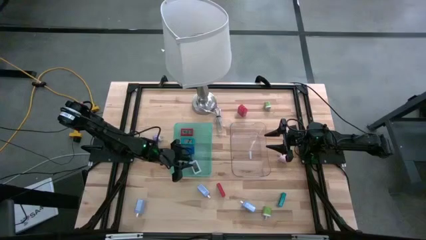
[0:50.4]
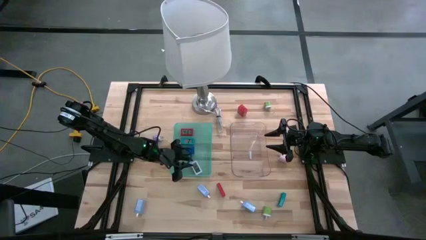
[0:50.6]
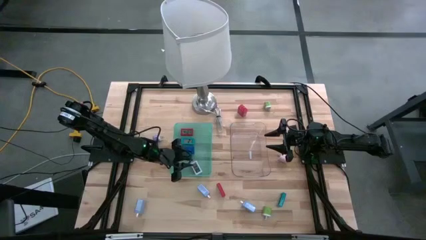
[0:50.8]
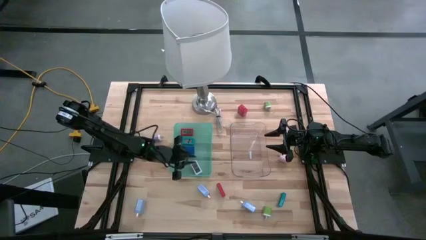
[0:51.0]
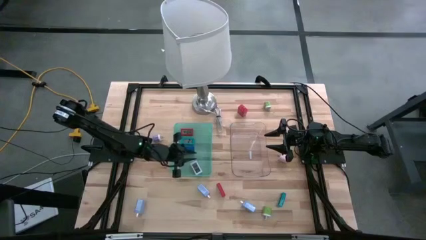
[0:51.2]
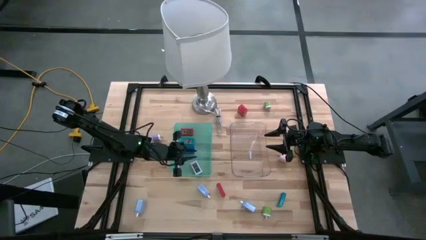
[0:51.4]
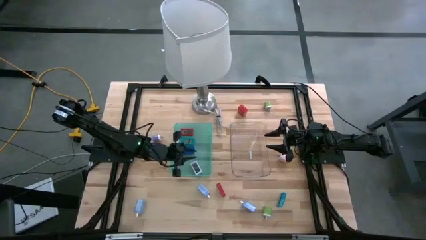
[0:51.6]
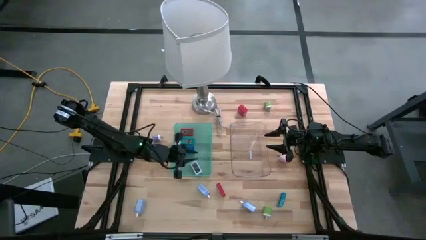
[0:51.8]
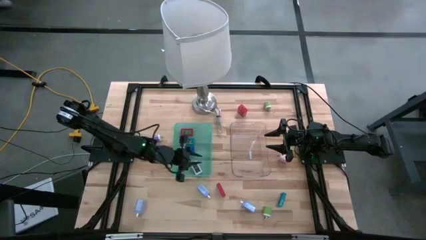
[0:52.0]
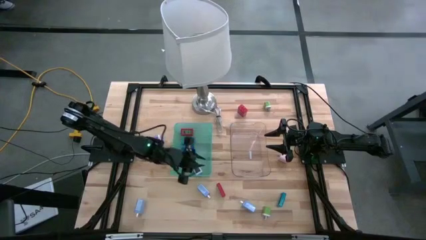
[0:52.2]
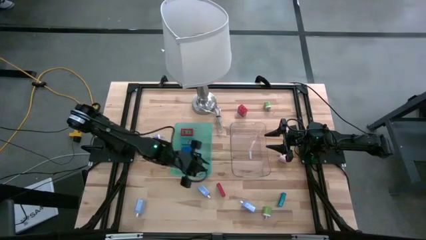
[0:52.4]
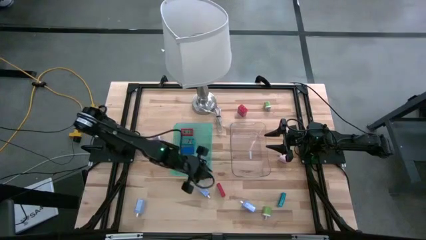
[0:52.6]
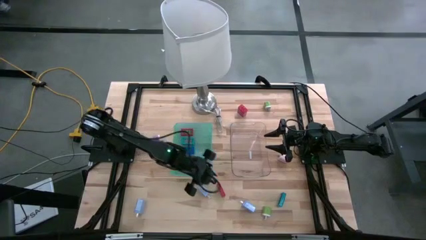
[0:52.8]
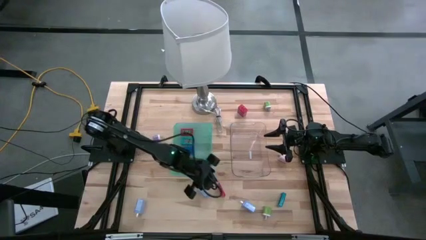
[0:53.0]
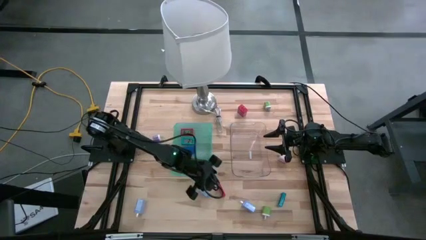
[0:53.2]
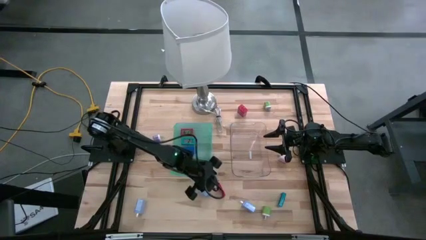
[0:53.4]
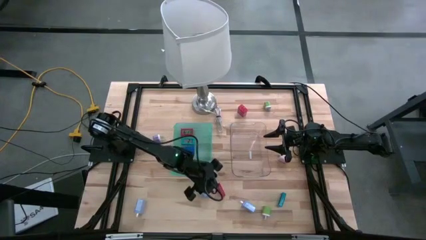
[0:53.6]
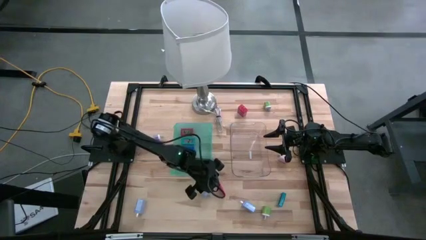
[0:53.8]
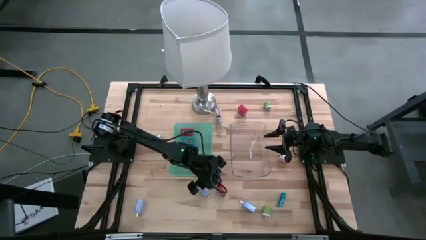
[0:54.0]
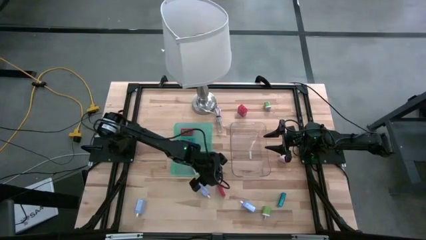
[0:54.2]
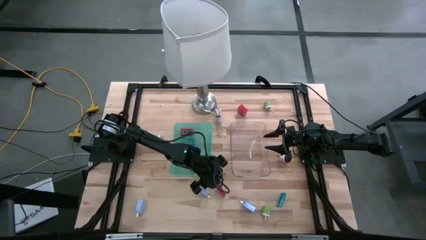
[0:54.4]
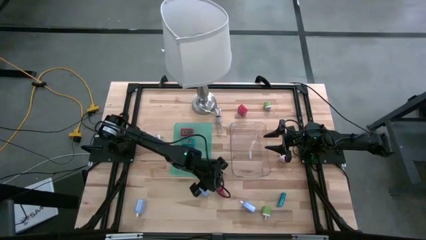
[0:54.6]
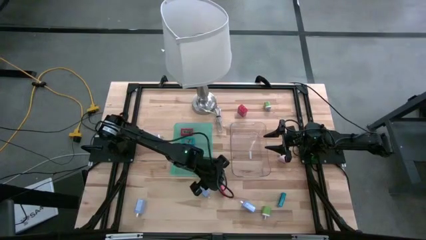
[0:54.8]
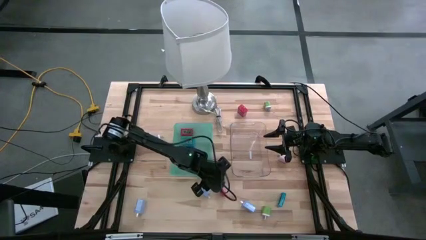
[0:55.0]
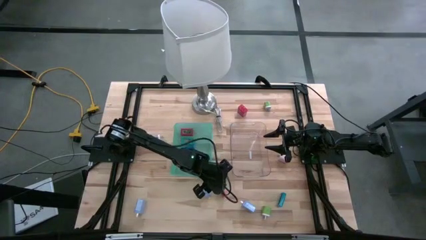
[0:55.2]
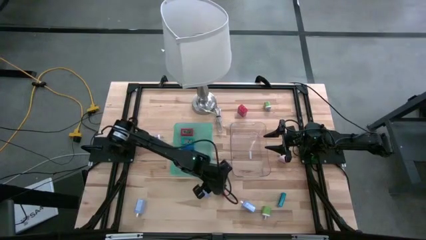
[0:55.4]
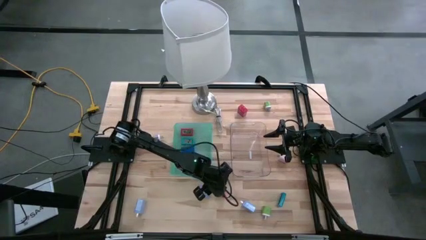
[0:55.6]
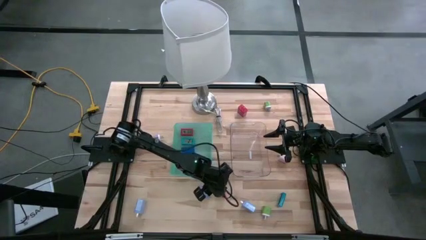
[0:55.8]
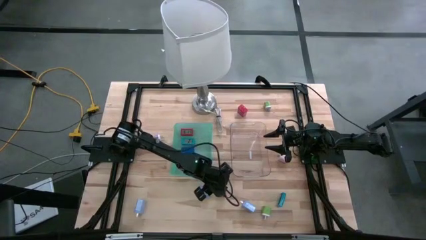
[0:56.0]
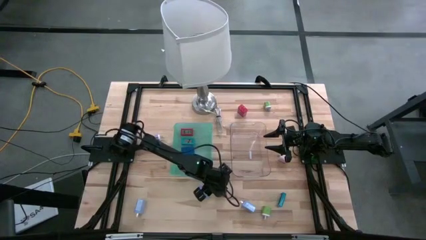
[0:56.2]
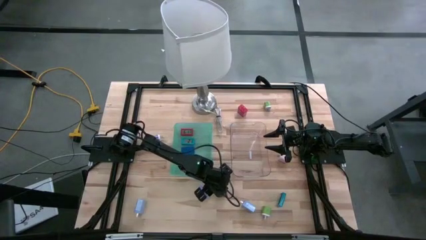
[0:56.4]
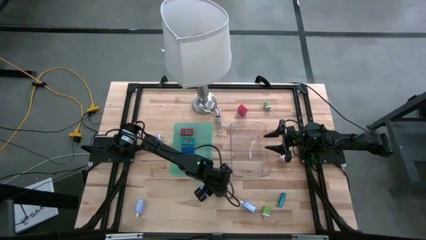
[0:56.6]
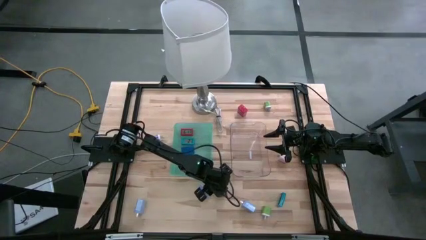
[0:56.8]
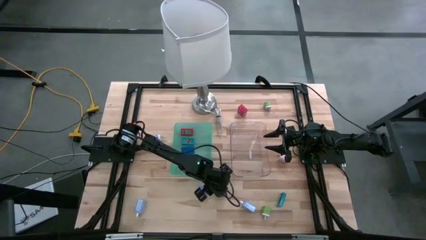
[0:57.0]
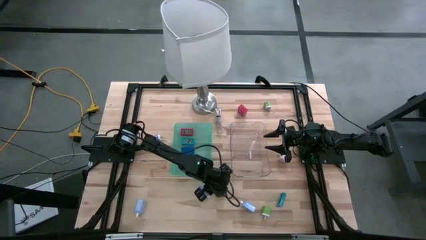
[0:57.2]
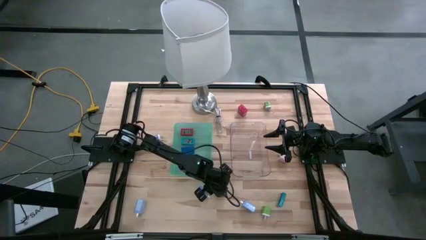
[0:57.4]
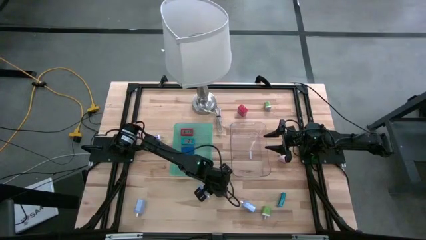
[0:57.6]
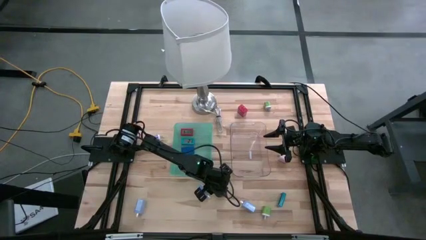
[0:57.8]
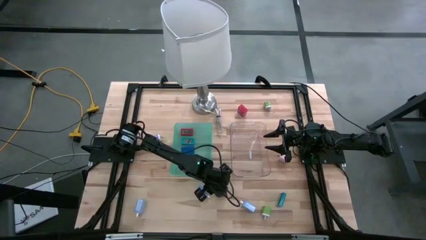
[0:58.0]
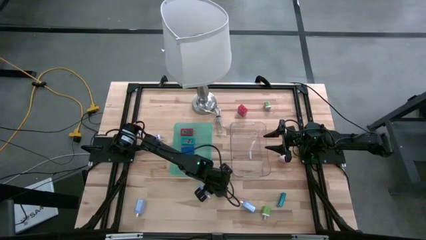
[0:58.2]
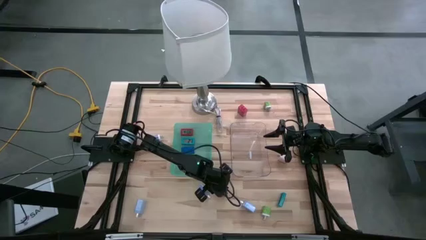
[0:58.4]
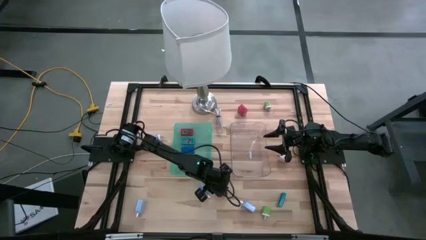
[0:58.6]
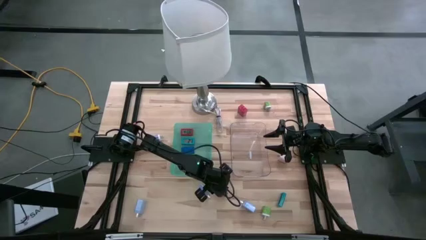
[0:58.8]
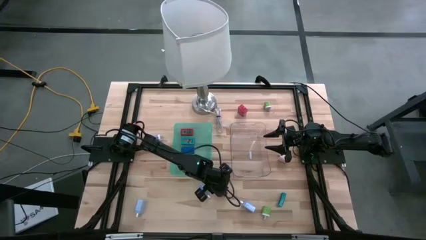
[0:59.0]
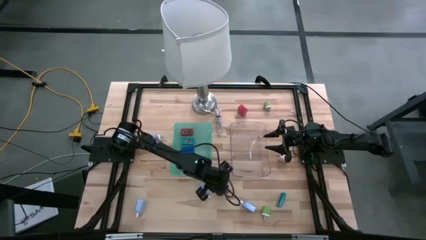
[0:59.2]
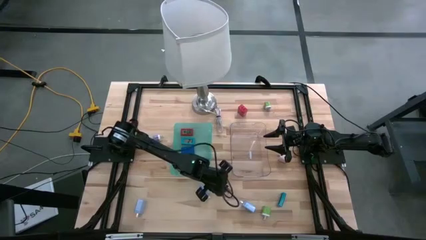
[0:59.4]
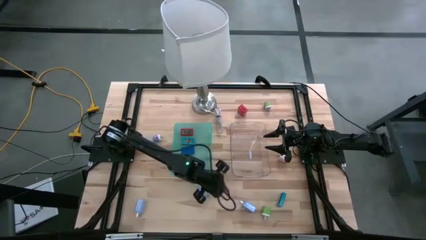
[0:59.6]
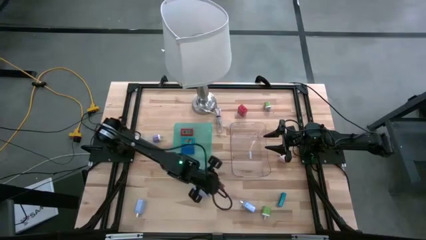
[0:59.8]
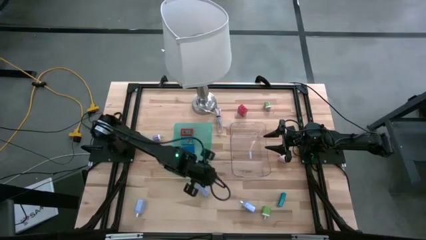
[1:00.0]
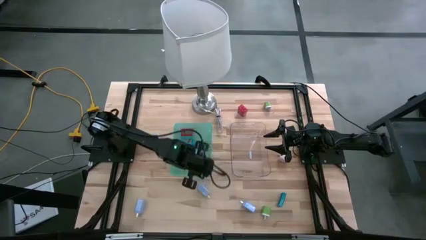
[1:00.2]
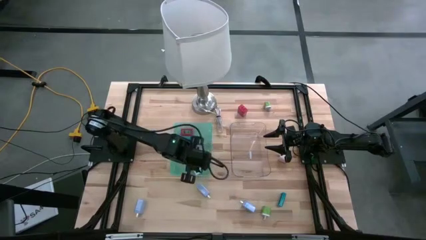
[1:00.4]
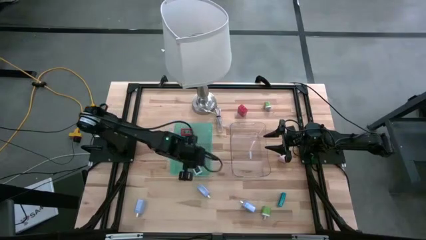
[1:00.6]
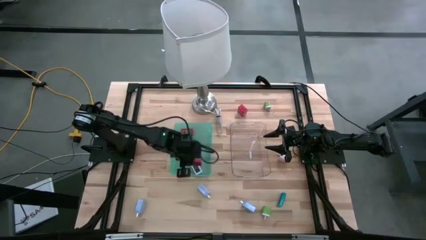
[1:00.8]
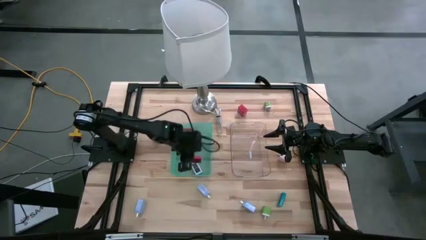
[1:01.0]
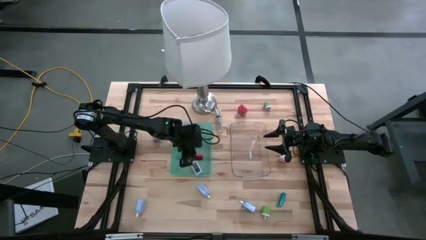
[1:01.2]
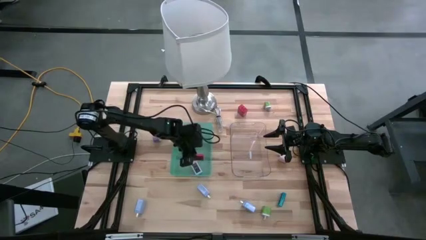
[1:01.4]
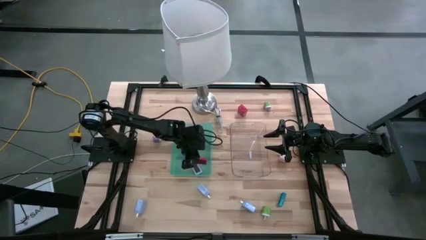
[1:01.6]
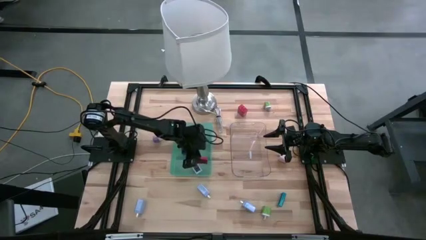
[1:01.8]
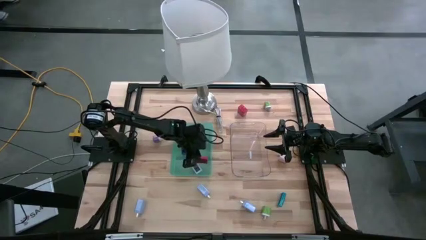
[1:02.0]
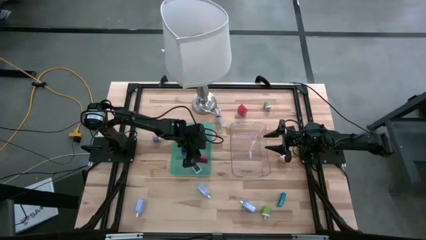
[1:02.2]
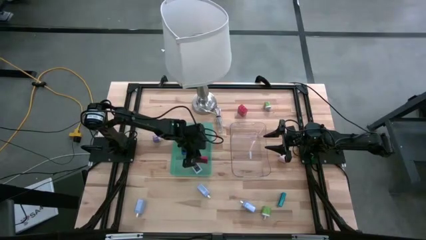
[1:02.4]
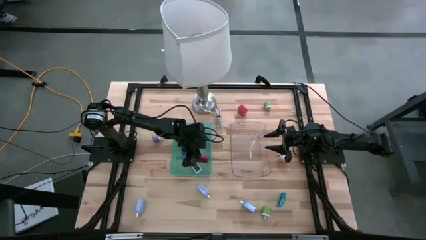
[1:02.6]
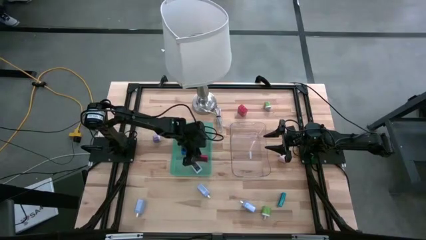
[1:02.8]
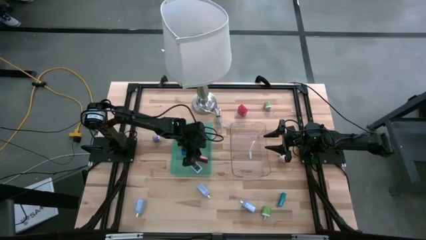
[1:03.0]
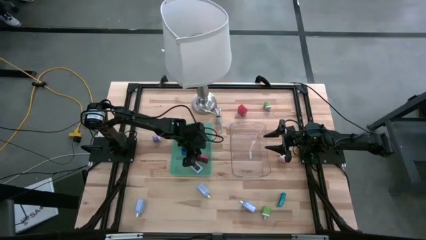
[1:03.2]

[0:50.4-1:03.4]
Task: Pick & Place Office items
Put the red digital clock into the green bin
